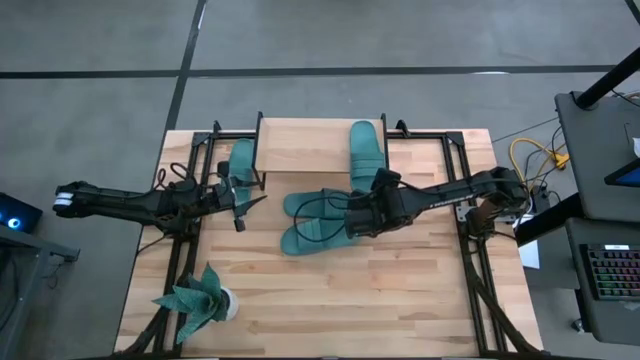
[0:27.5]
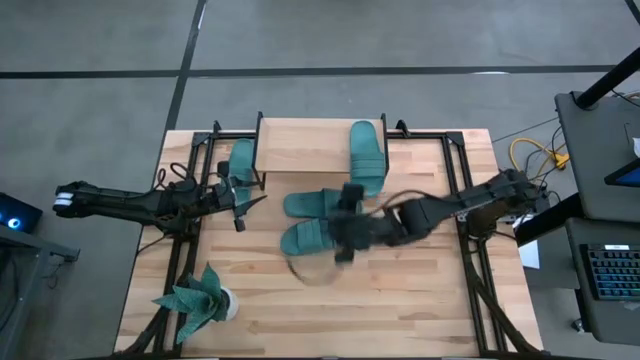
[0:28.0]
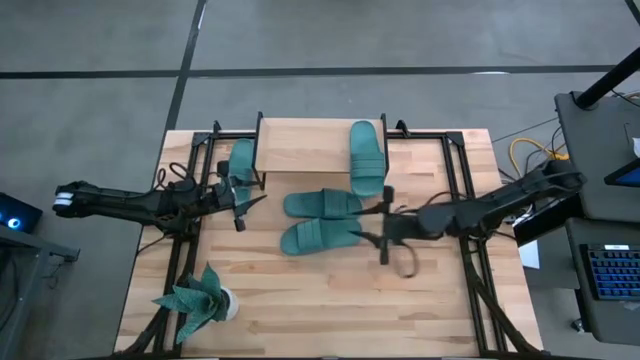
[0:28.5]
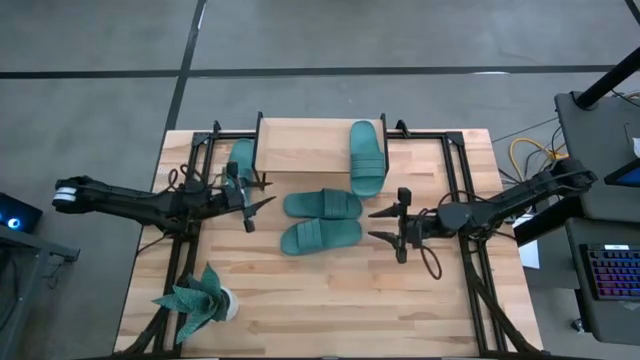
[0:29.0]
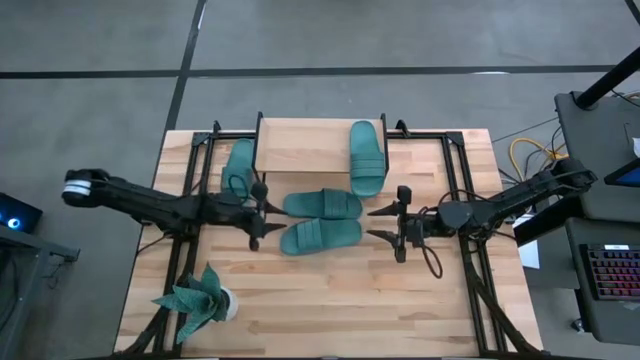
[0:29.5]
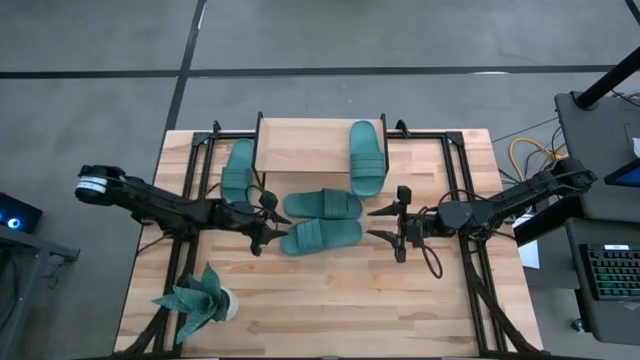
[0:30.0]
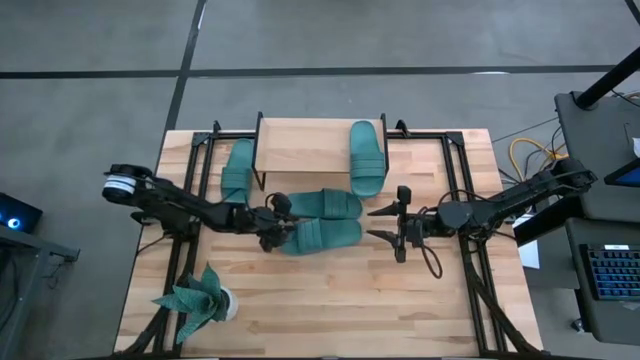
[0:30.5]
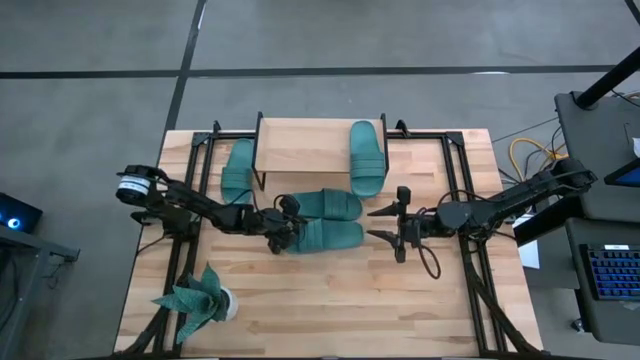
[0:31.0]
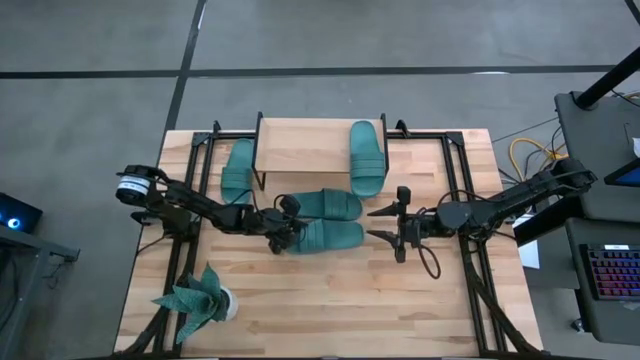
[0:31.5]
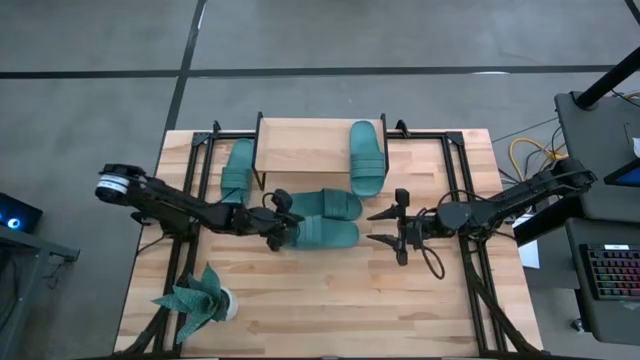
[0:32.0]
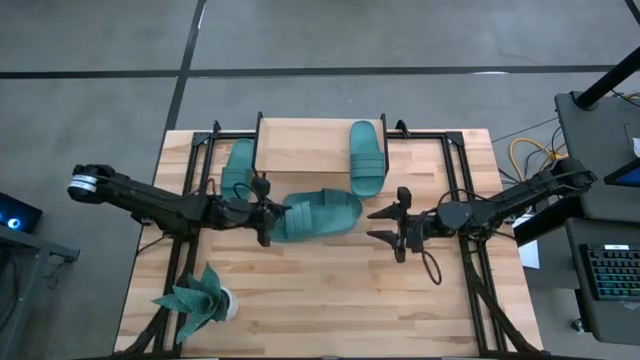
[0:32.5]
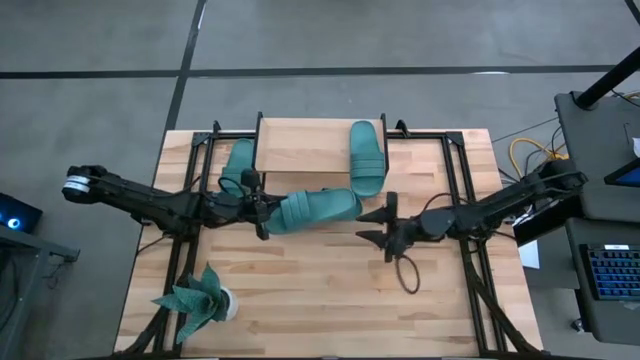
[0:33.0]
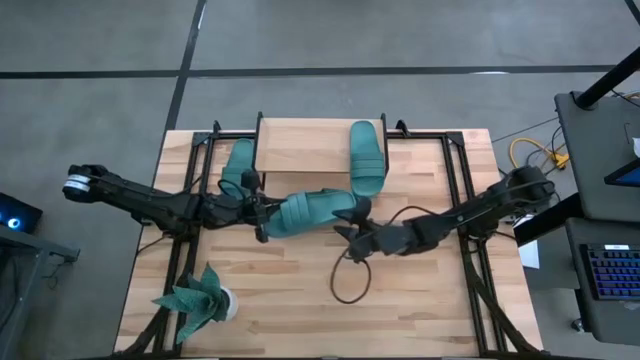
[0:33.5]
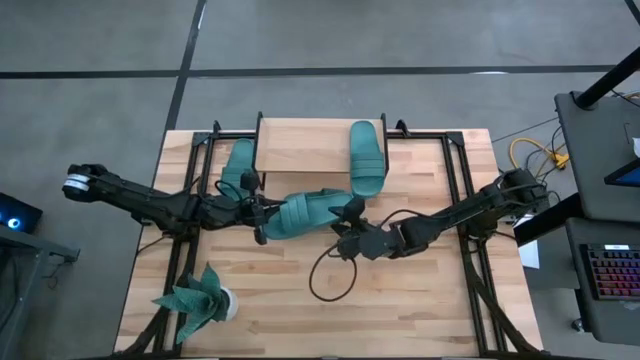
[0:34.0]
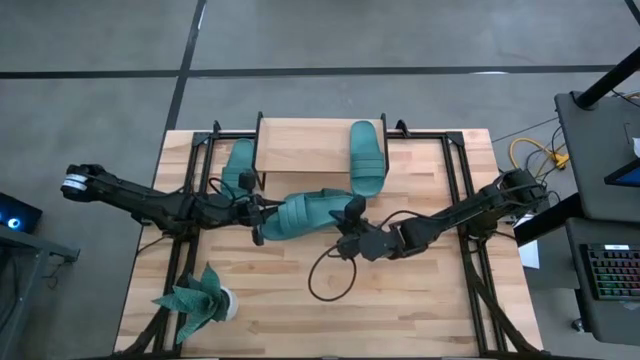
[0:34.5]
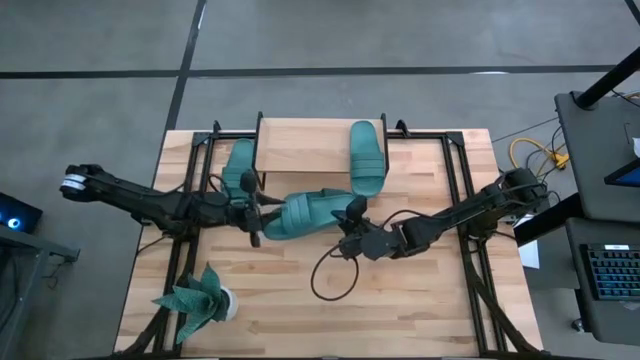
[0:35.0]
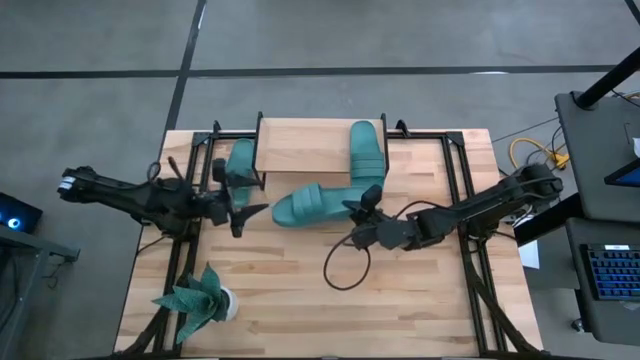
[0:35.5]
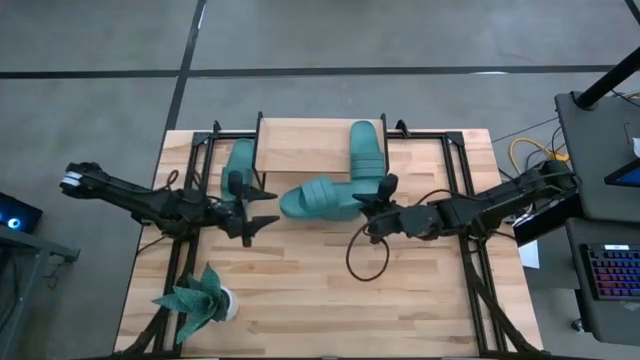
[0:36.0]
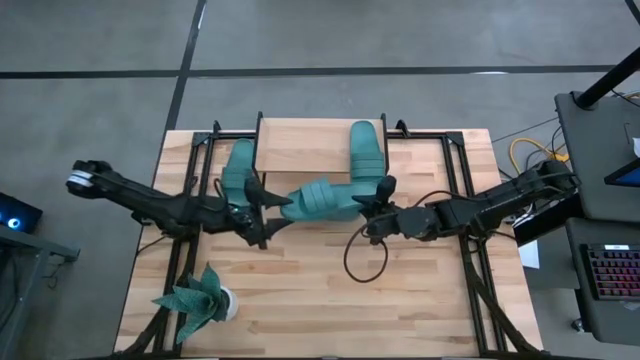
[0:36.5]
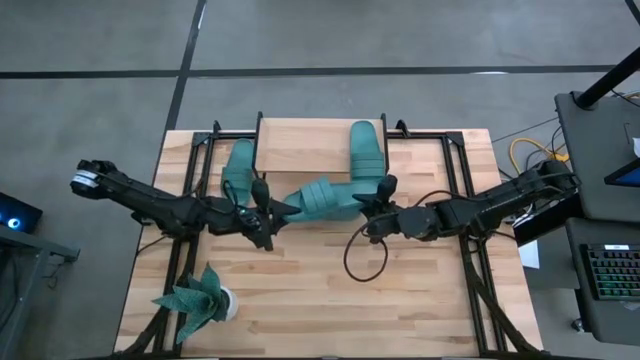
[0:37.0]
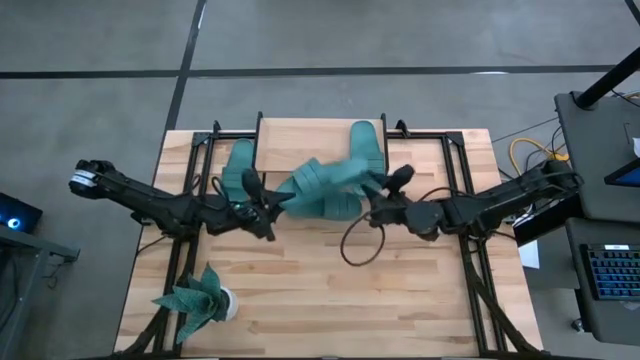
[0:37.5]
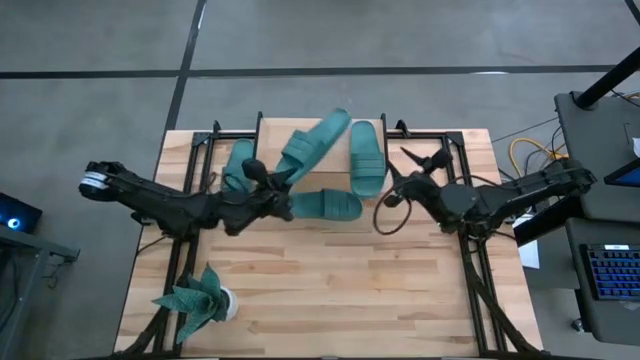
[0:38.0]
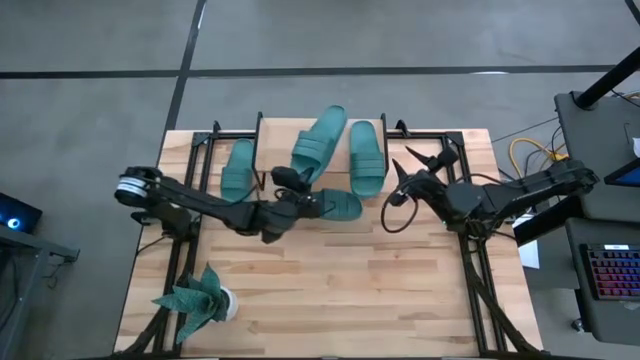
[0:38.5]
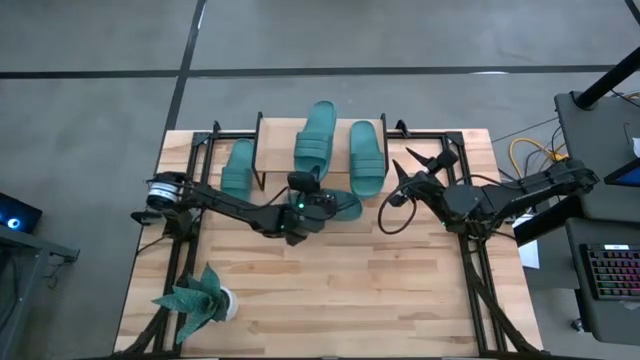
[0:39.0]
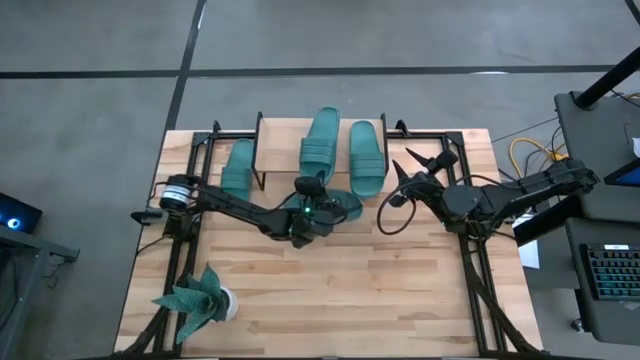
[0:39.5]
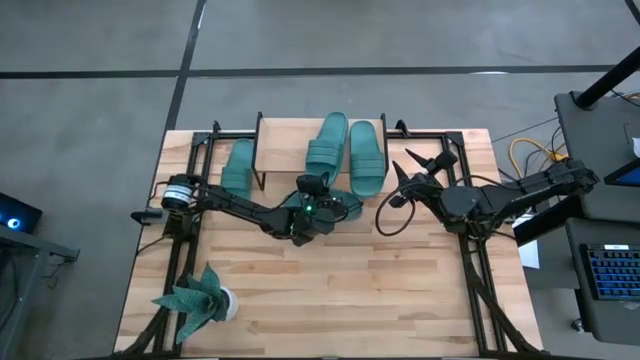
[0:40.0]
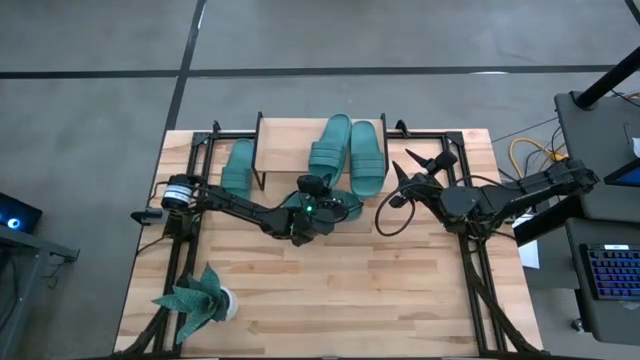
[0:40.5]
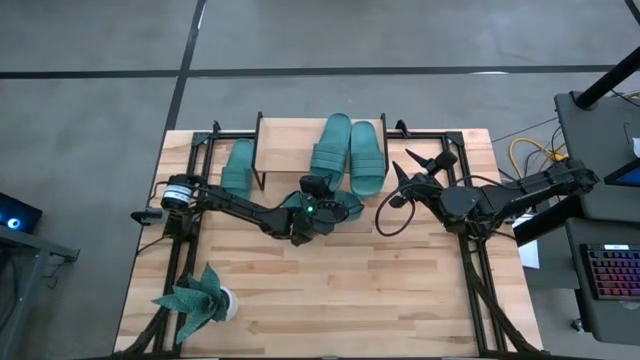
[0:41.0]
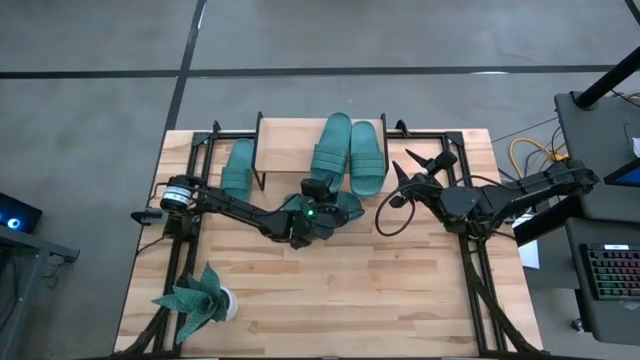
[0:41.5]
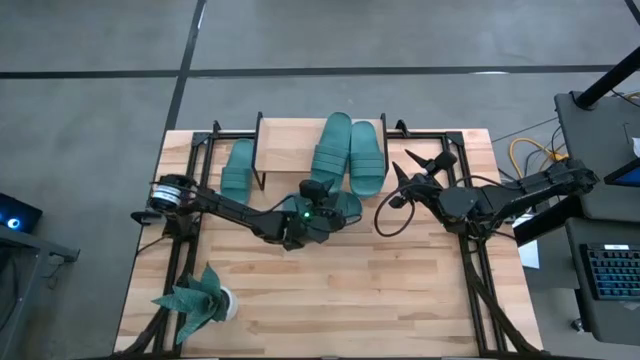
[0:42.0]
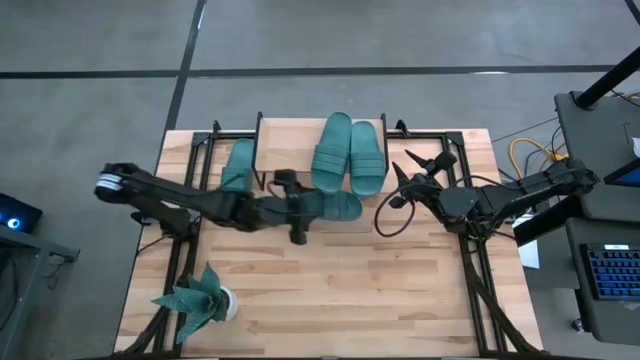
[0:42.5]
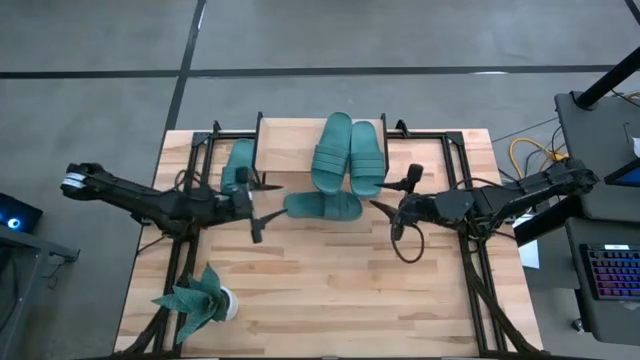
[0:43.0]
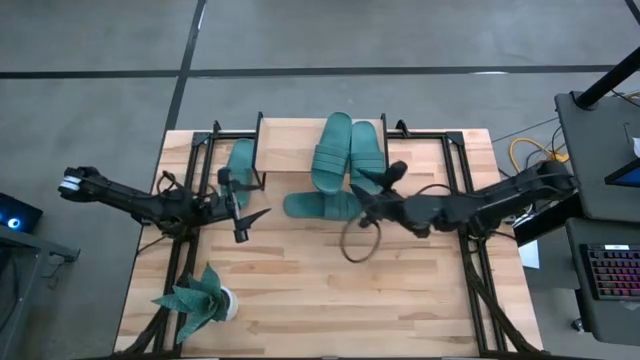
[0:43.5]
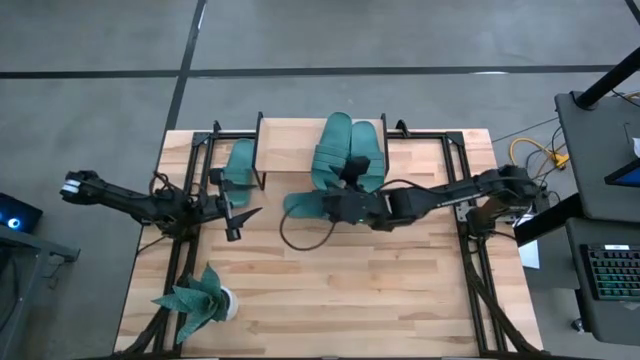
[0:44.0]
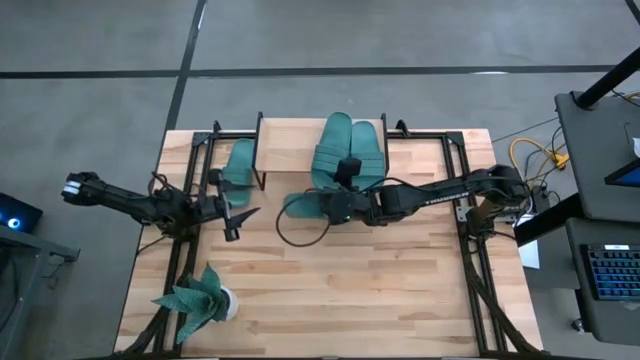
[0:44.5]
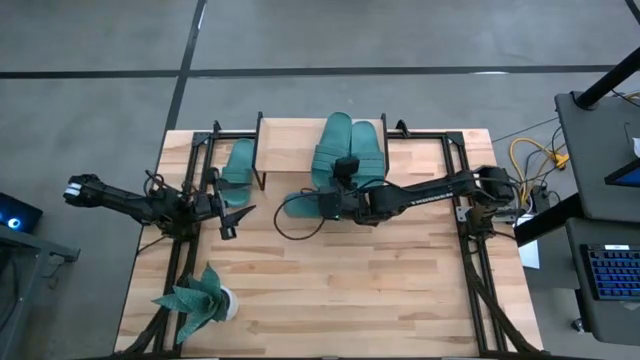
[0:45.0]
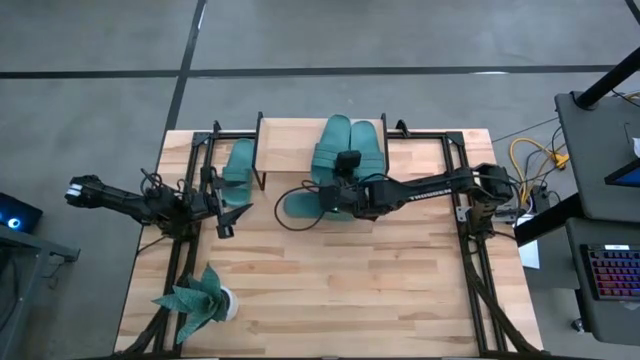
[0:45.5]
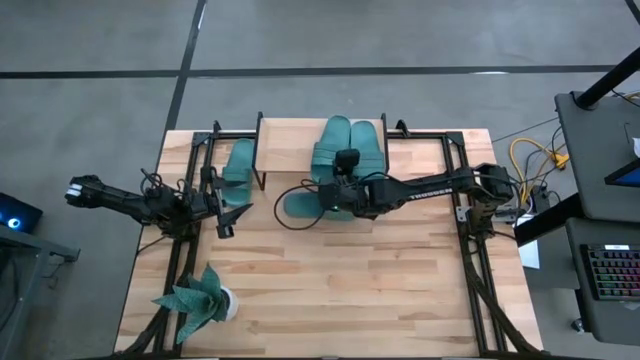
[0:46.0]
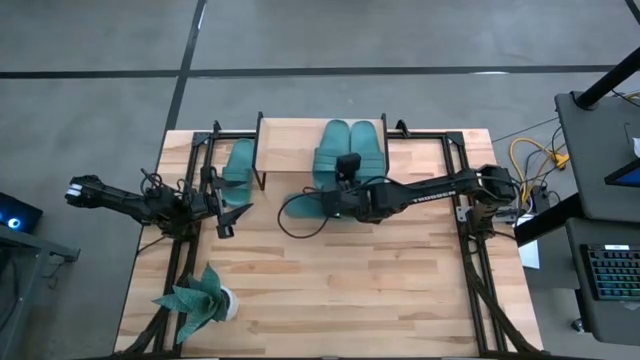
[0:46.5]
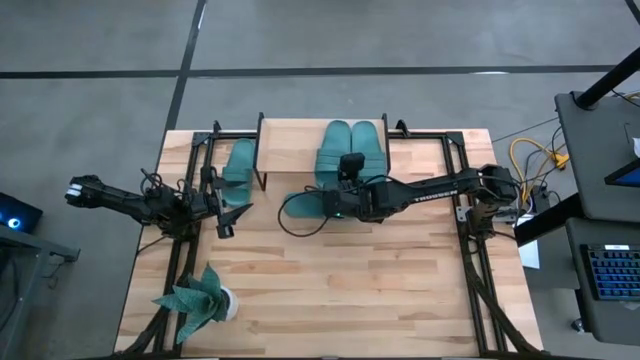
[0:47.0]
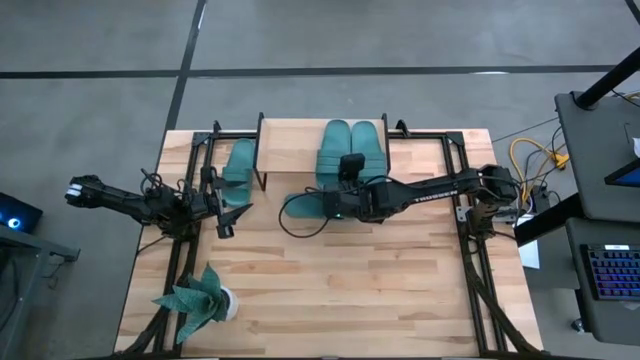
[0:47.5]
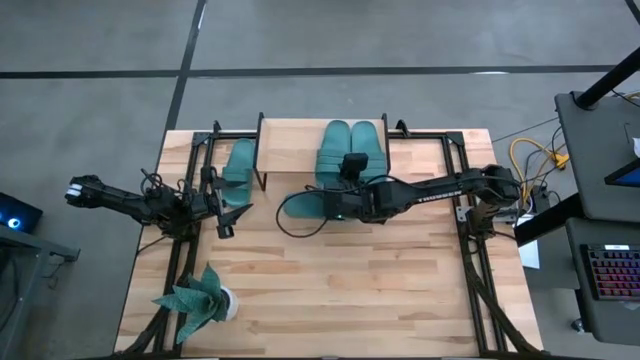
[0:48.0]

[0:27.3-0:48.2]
Task: Pick and place slides into the shelf
Put the bottom green slide on the shelf
